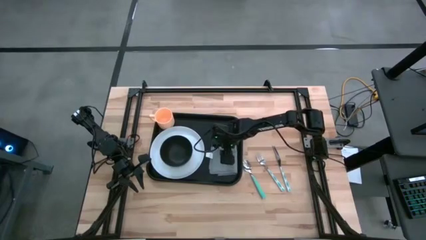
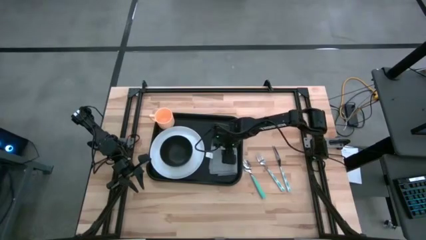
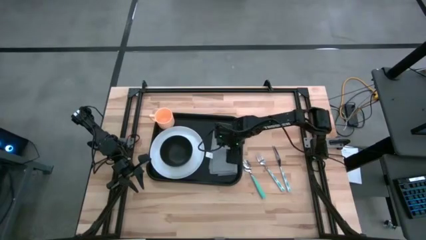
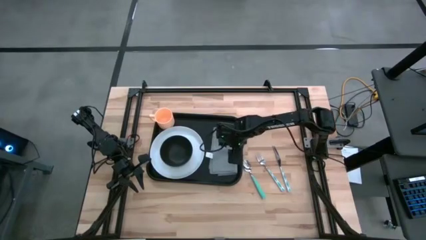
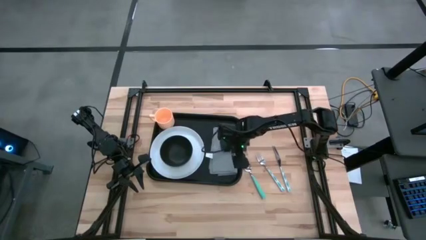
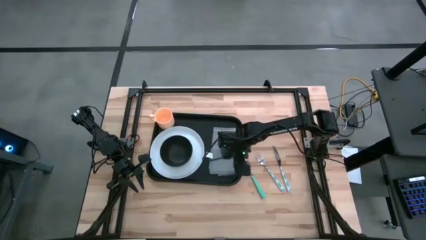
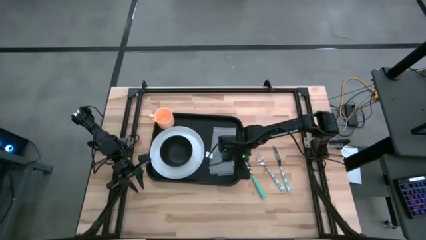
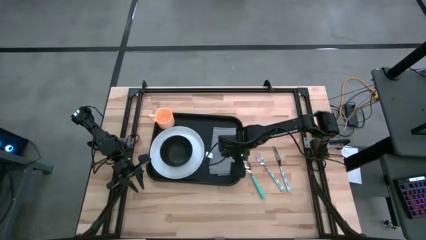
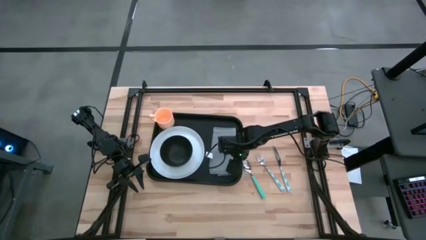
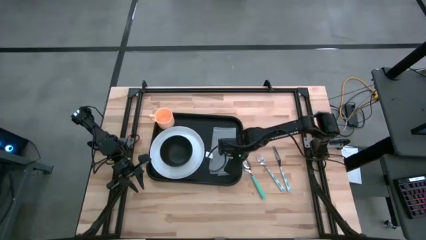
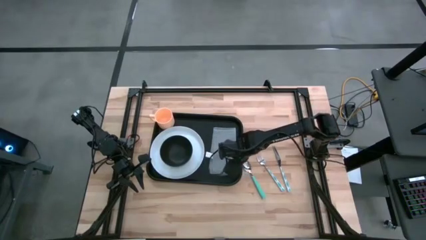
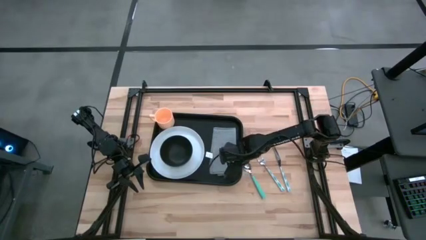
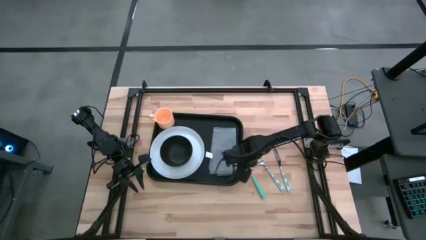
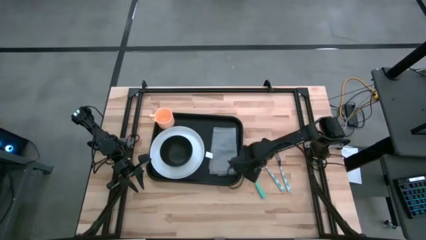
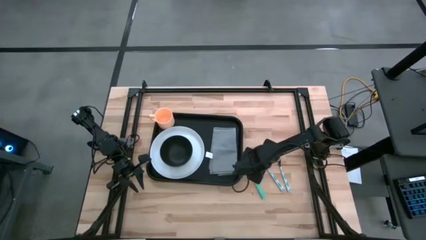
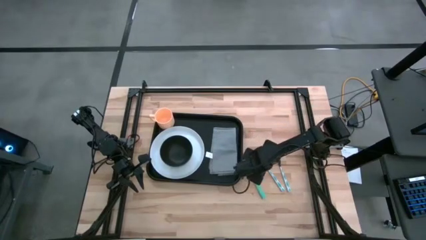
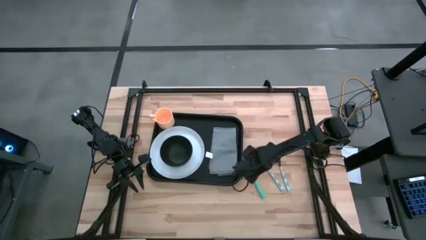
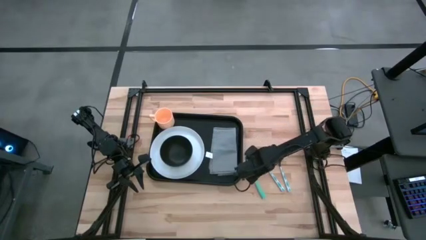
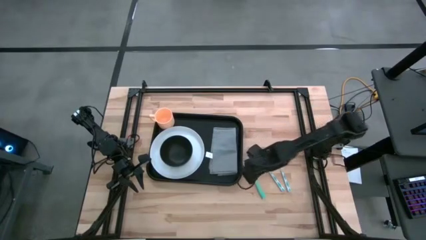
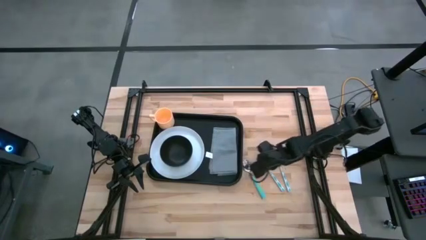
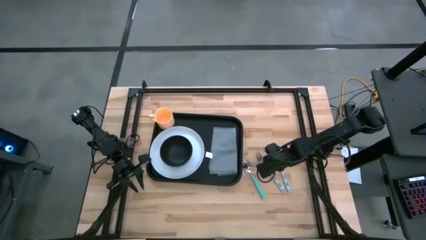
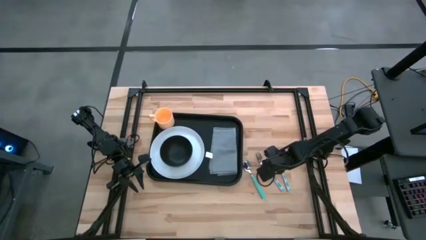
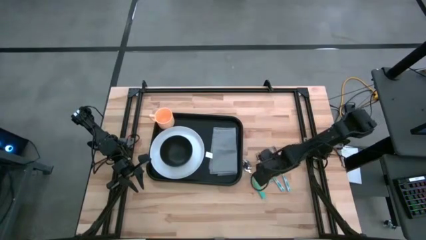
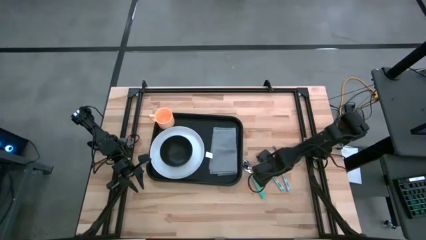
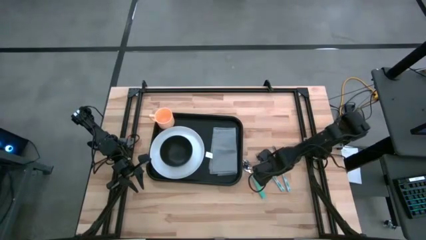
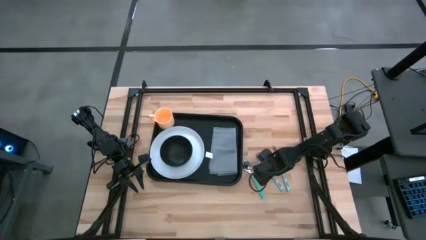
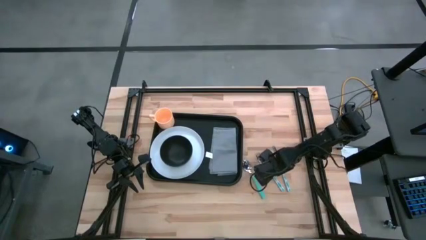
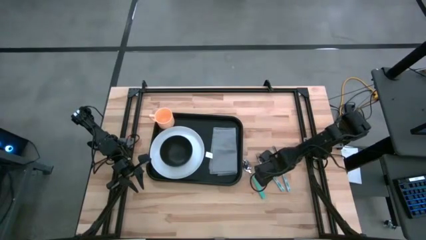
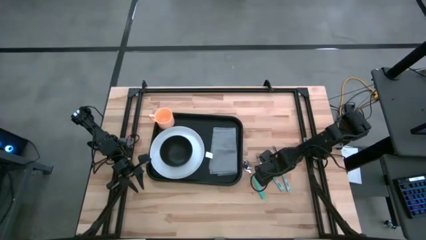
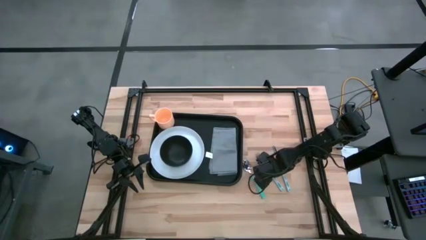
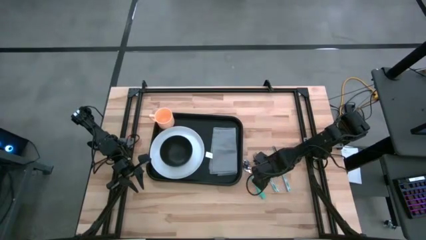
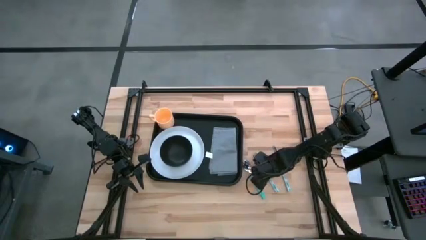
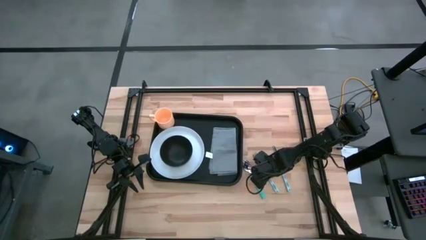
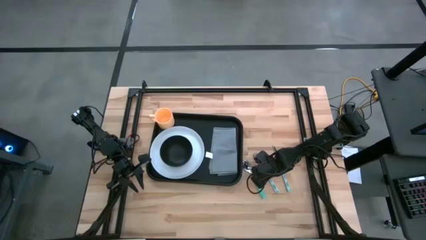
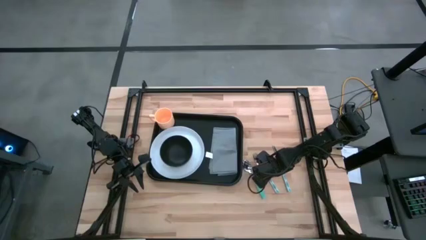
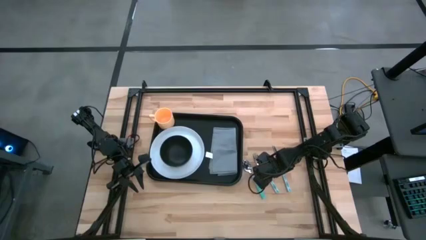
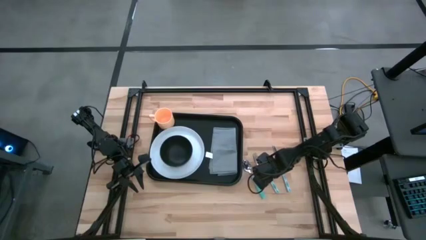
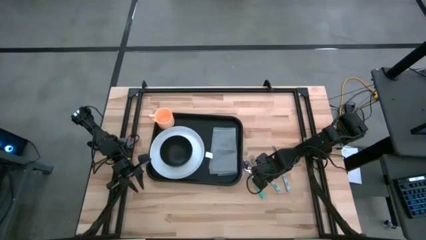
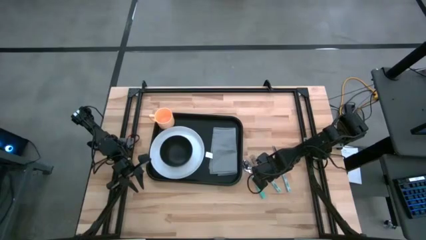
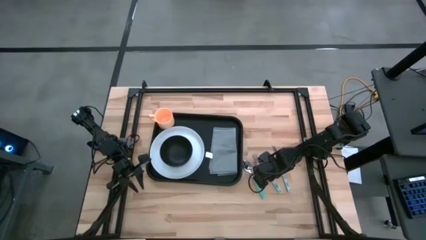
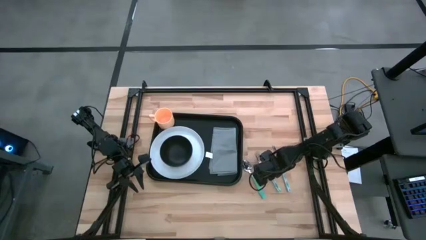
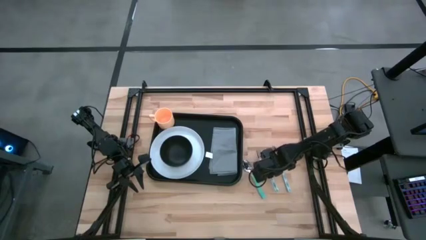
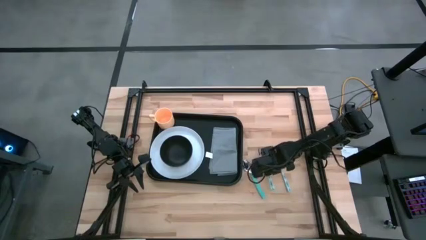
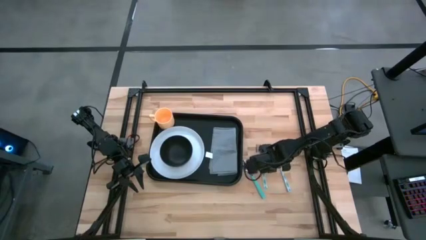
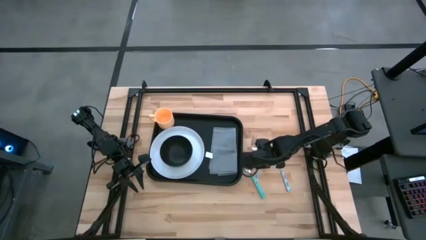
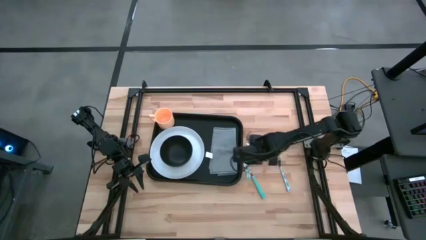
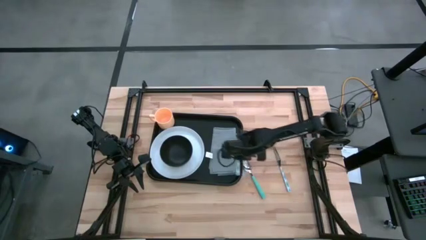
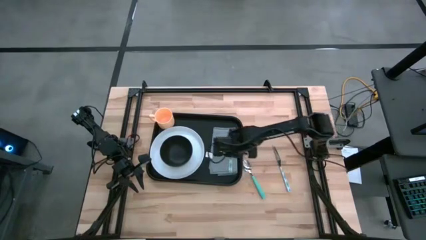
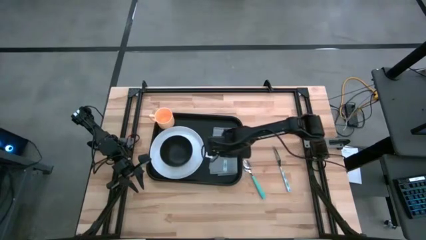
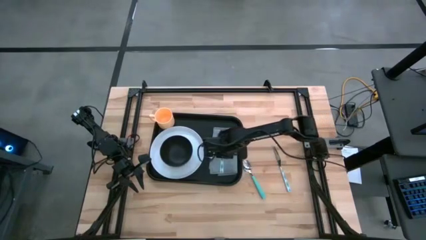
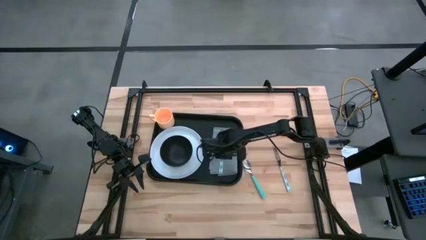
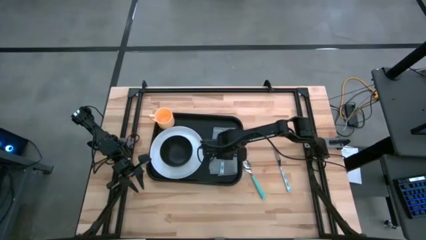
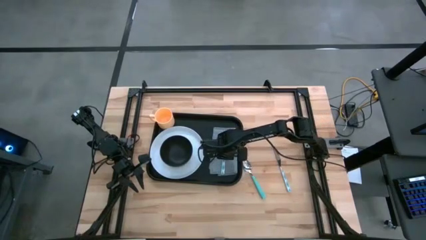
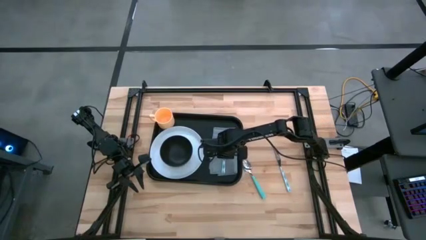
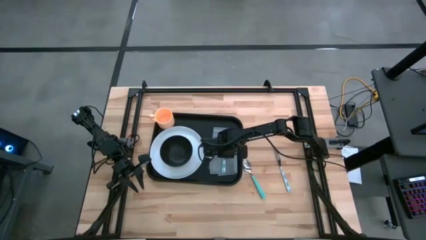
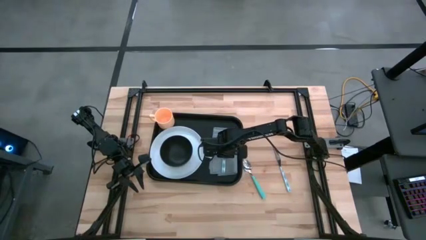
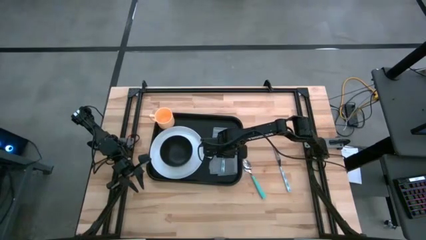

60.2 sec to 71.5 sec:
Task: Set up tray
Put the blue fork on top of the gray napkin

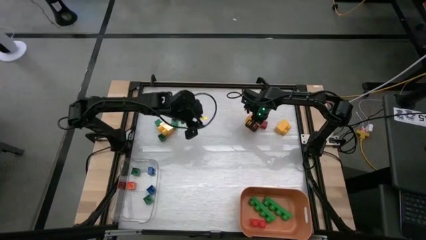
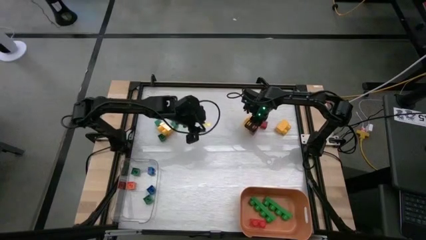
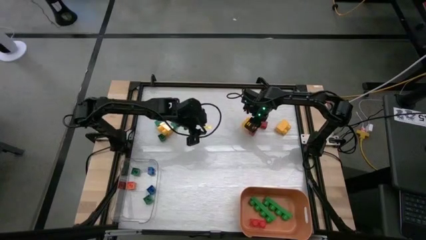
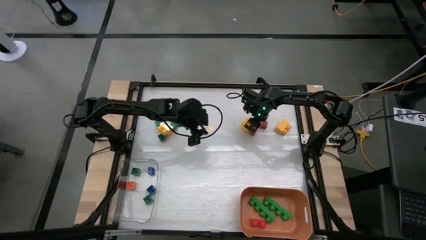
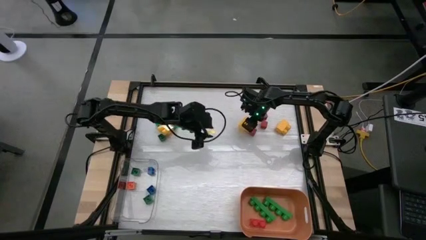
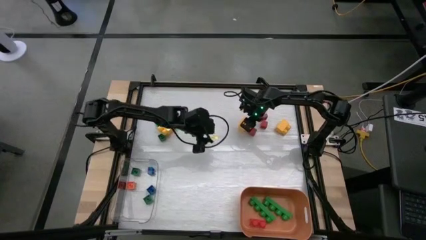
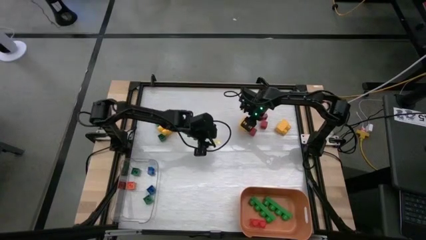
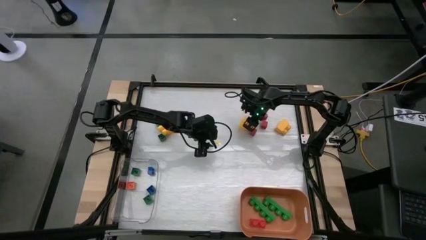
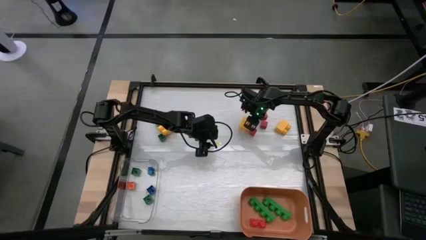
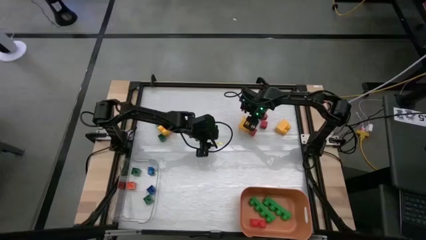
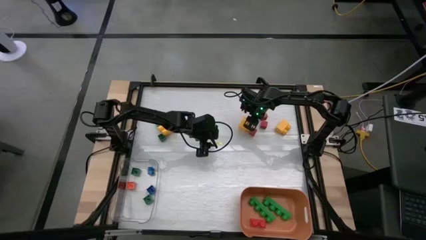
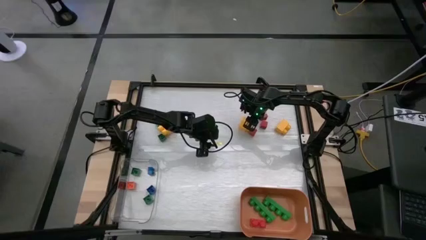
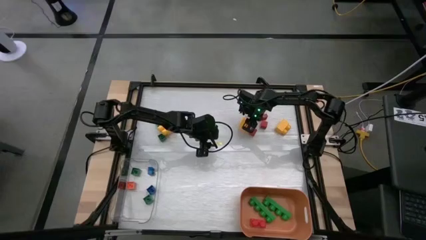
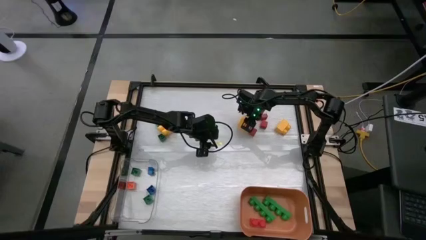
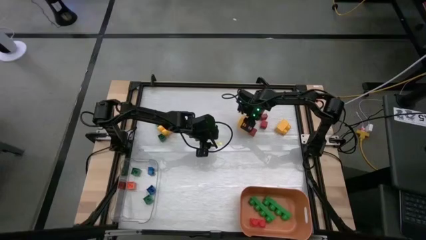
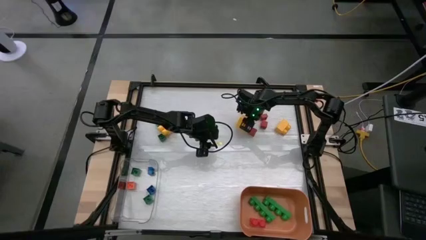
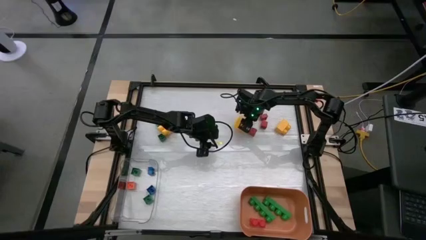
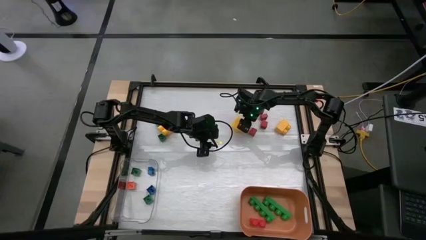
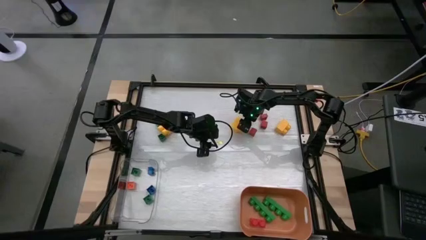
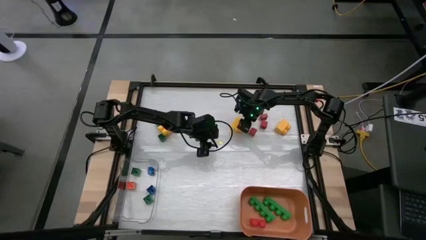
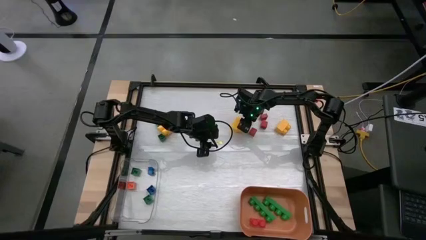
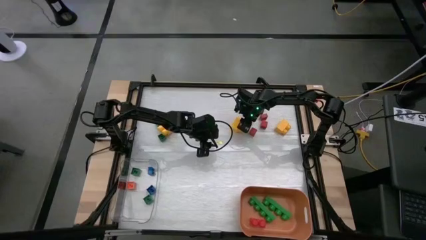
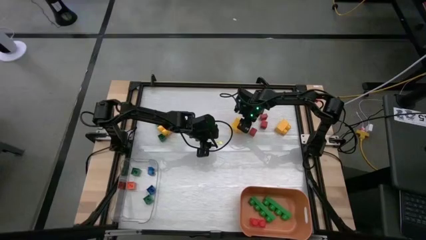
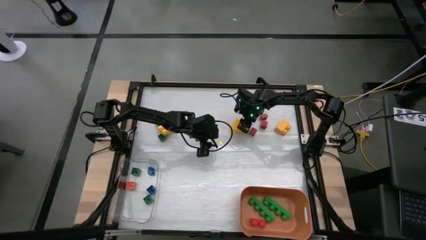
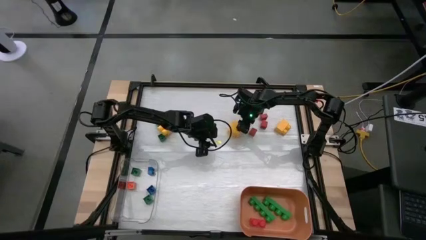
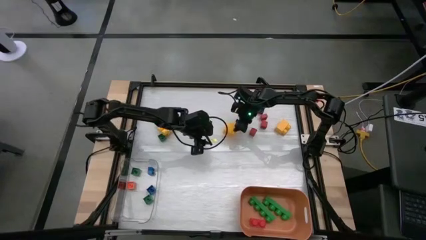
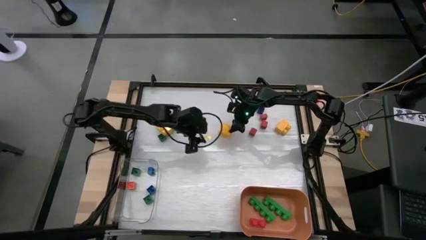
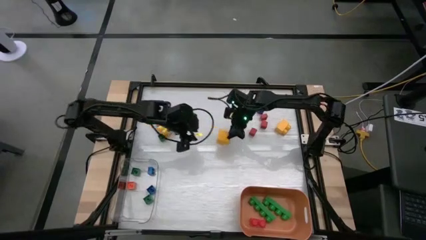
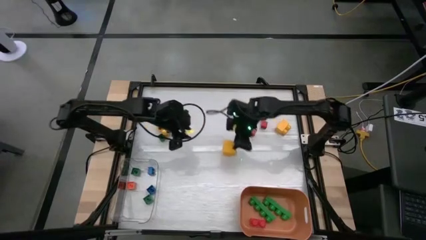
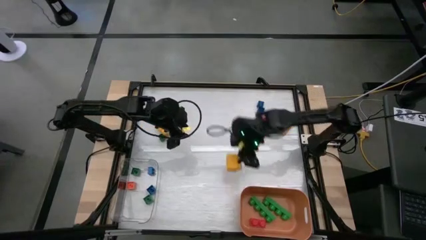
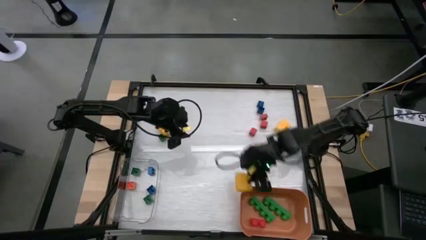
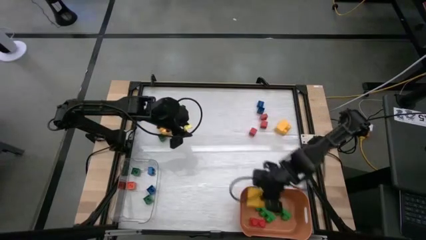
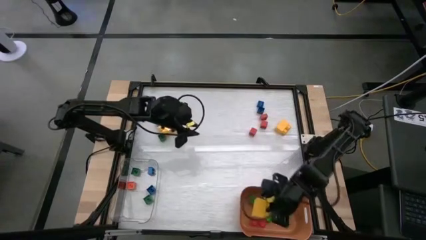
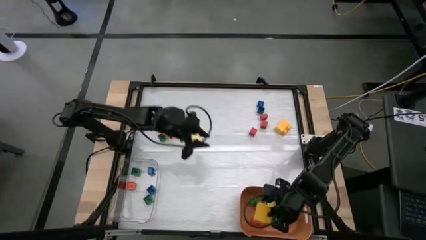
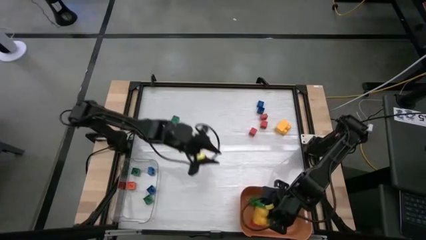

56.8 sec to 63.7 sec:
Task: Sort blocks by size
Put the big yellow game piece into the orange bin
